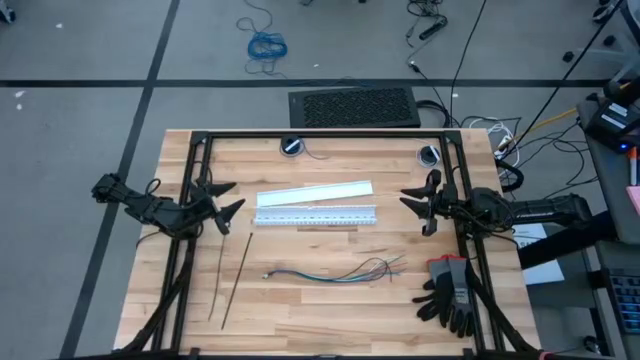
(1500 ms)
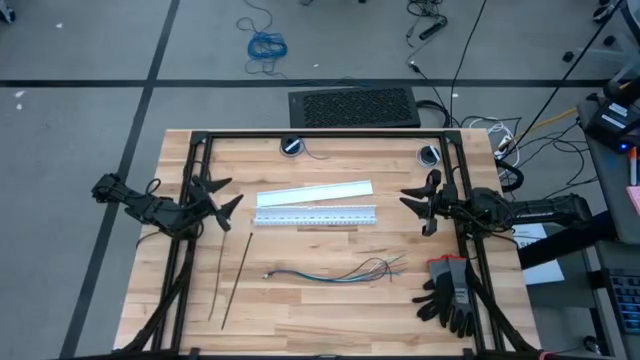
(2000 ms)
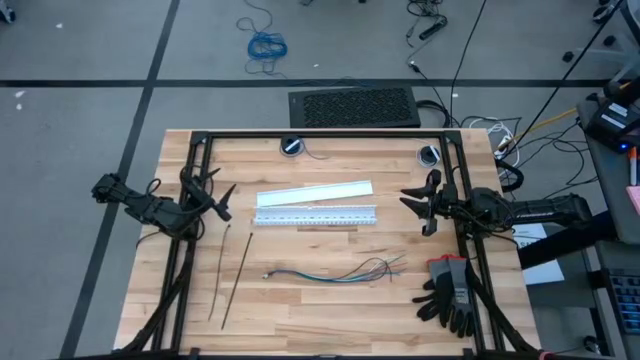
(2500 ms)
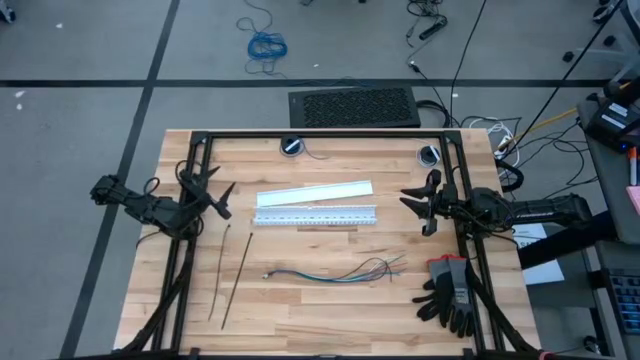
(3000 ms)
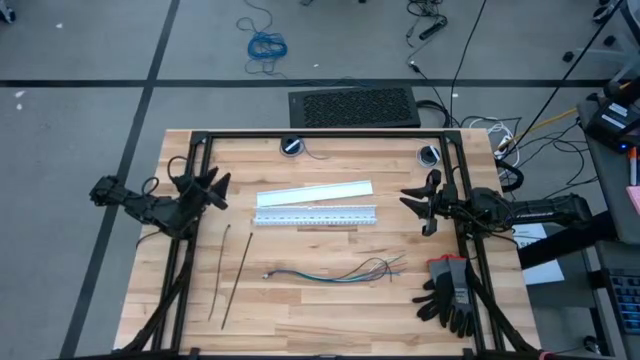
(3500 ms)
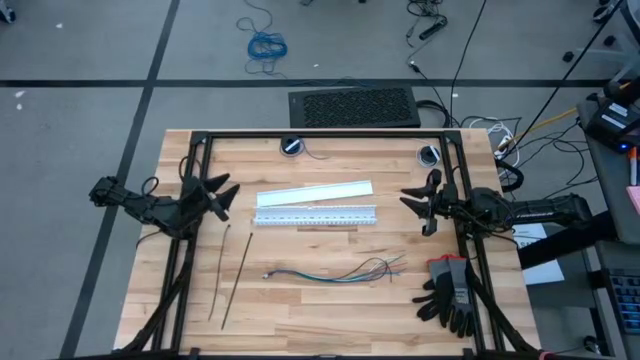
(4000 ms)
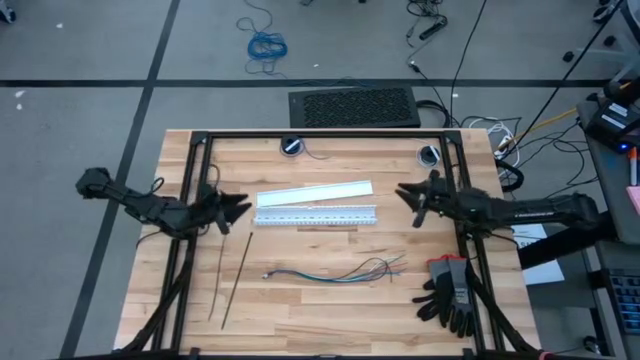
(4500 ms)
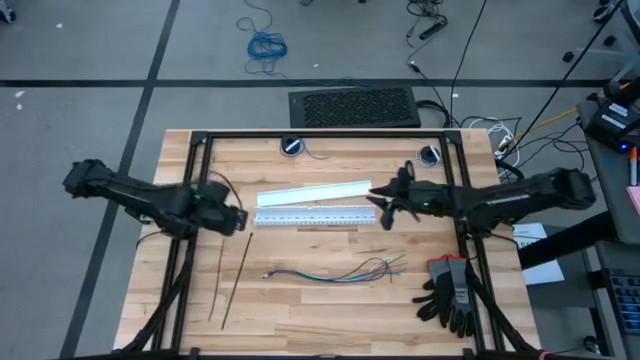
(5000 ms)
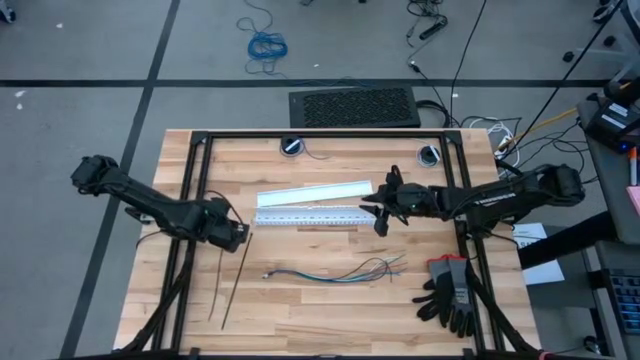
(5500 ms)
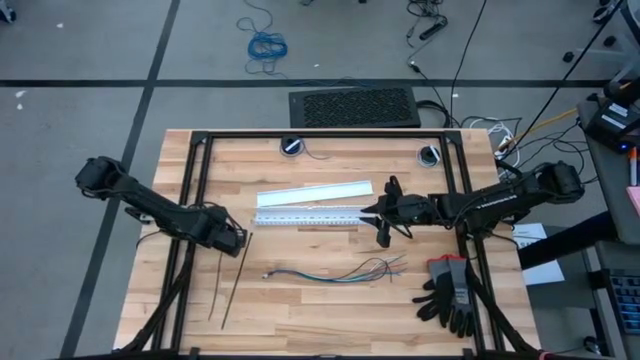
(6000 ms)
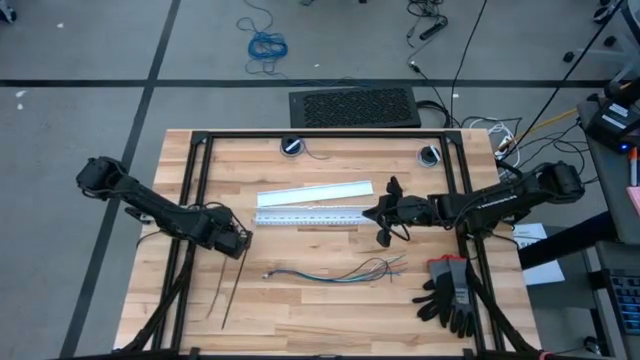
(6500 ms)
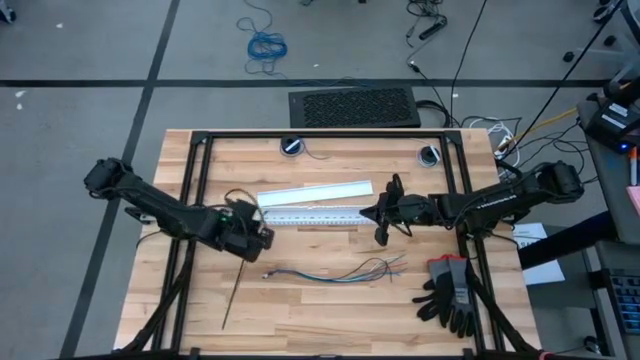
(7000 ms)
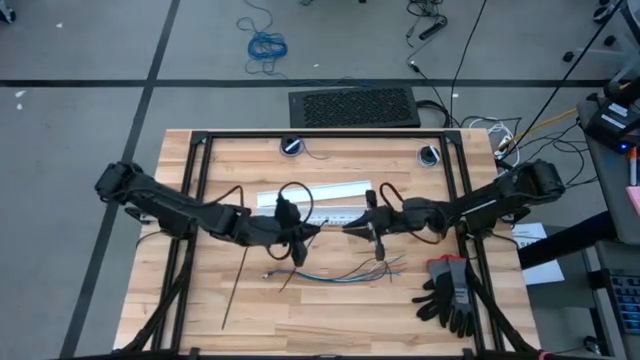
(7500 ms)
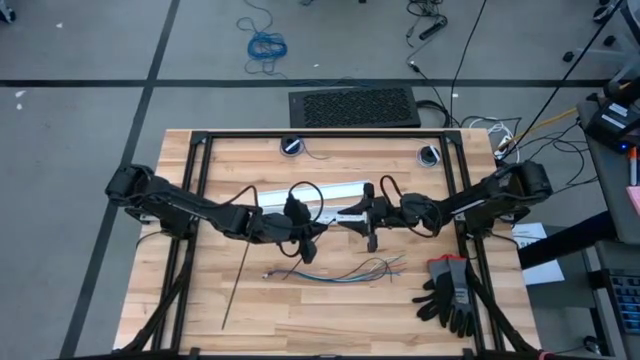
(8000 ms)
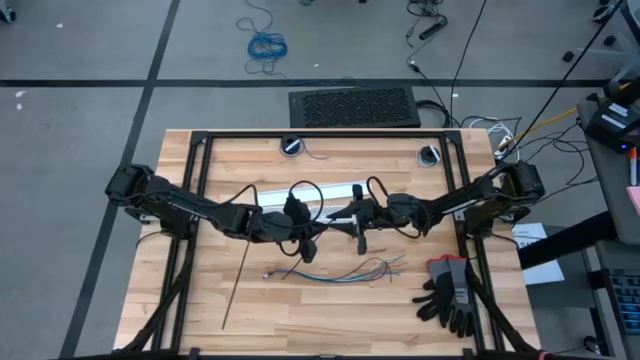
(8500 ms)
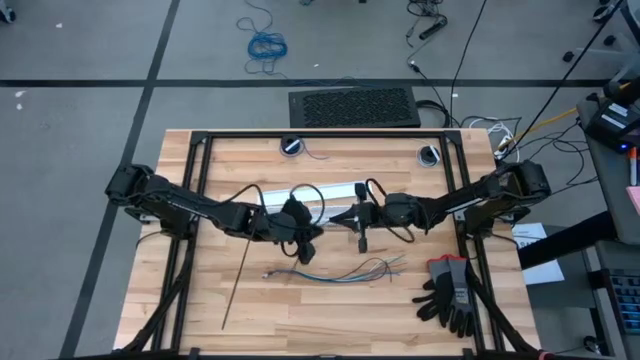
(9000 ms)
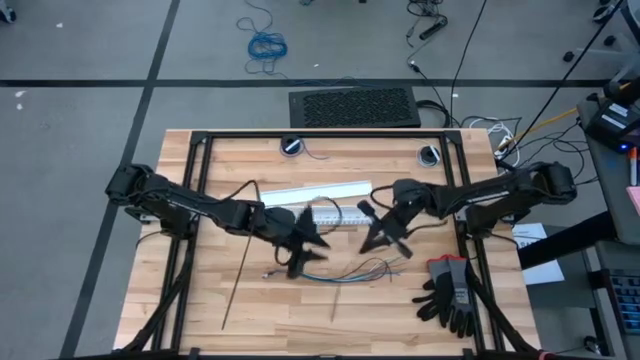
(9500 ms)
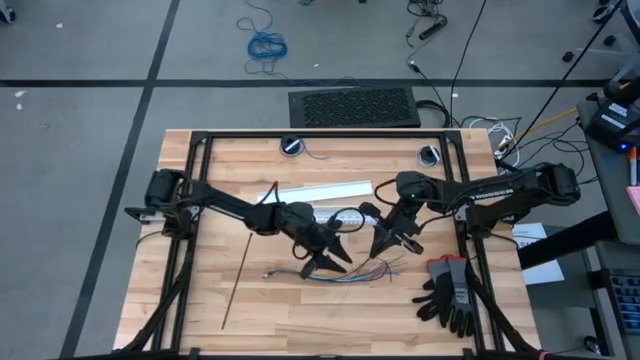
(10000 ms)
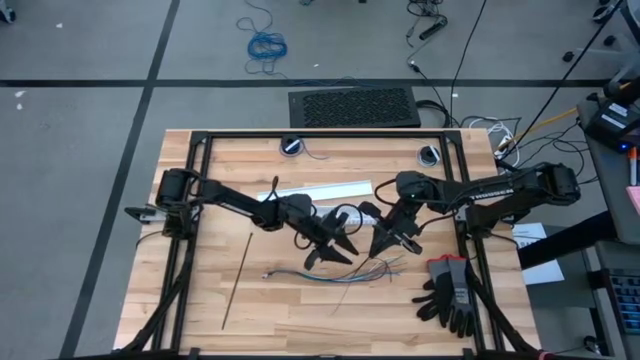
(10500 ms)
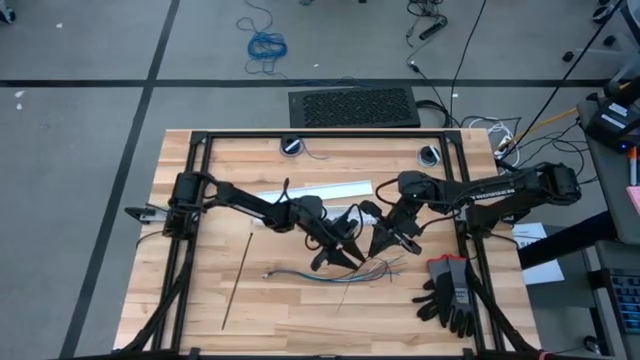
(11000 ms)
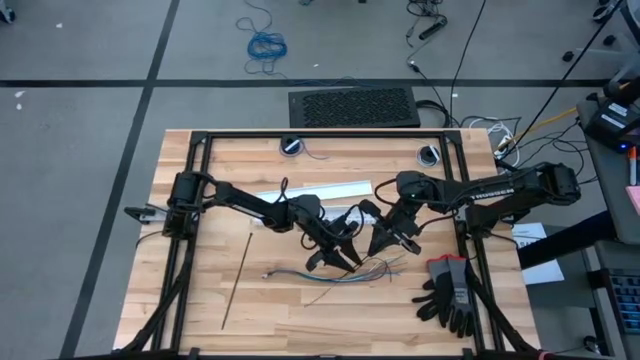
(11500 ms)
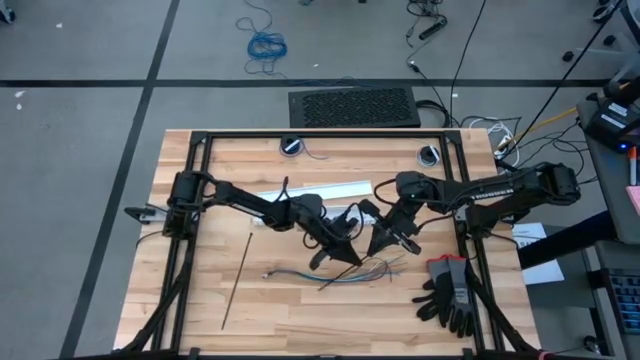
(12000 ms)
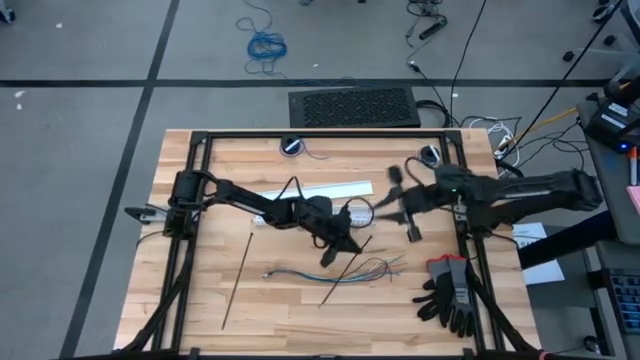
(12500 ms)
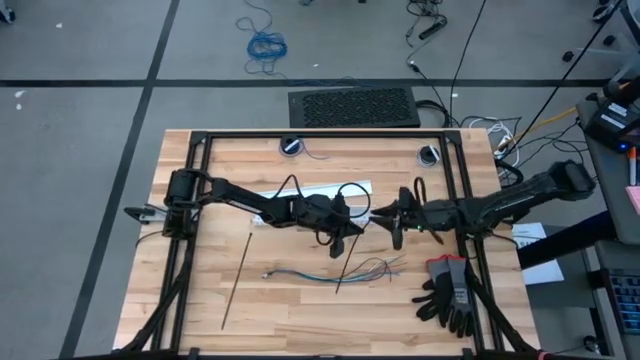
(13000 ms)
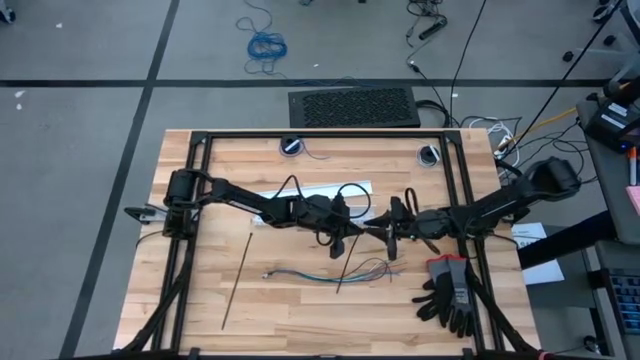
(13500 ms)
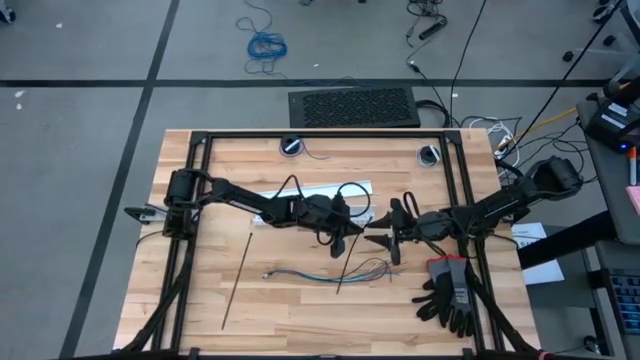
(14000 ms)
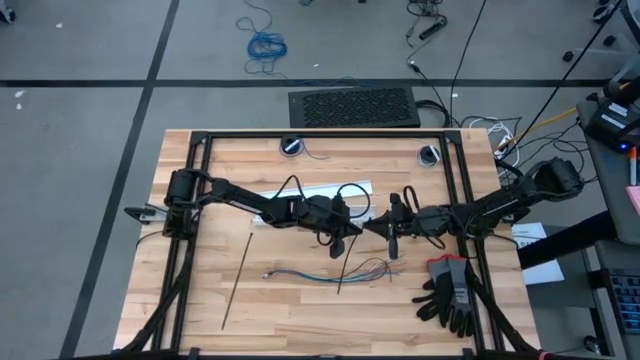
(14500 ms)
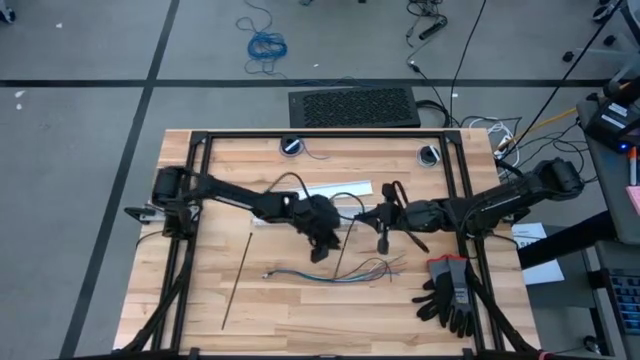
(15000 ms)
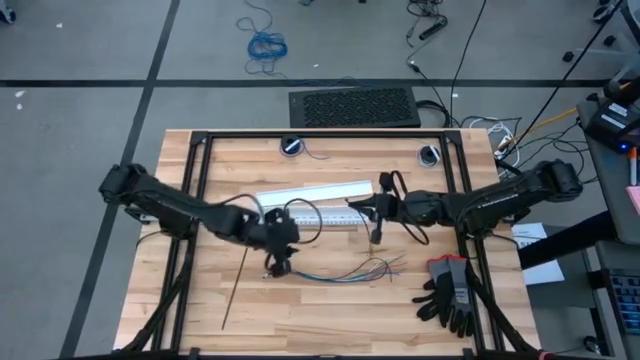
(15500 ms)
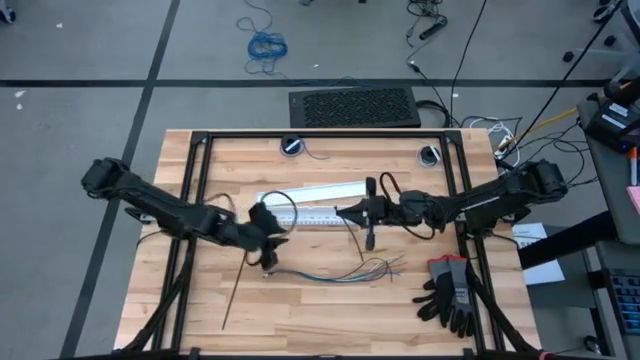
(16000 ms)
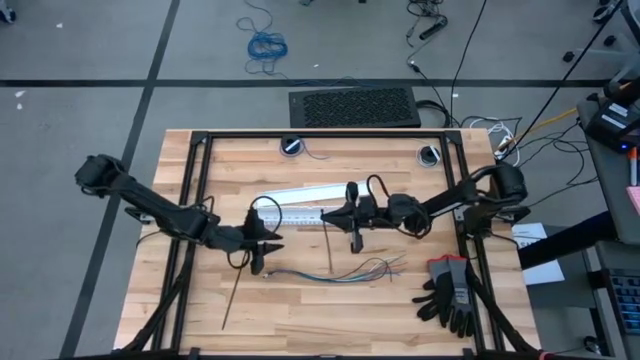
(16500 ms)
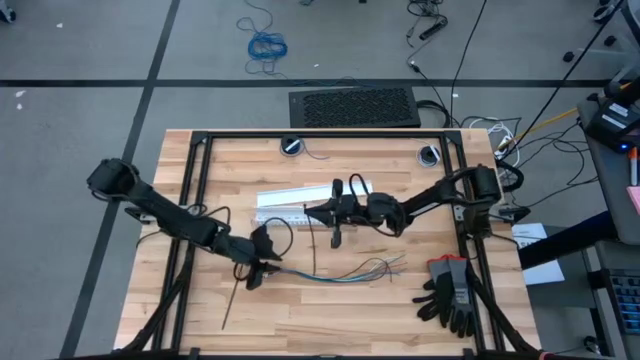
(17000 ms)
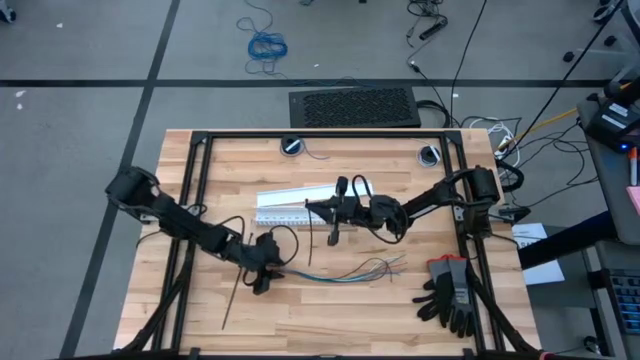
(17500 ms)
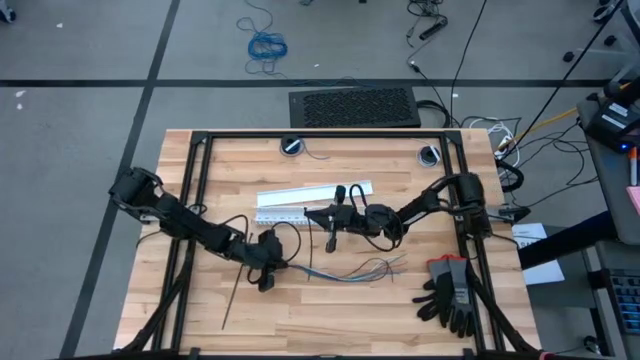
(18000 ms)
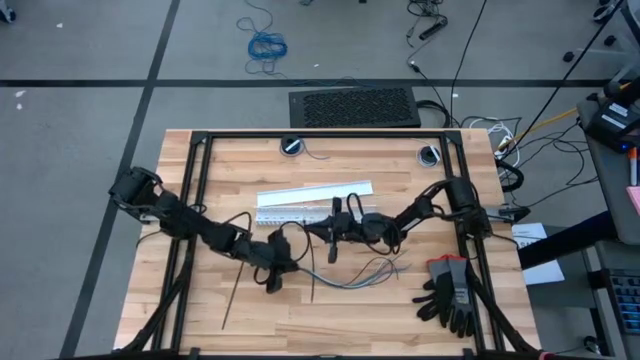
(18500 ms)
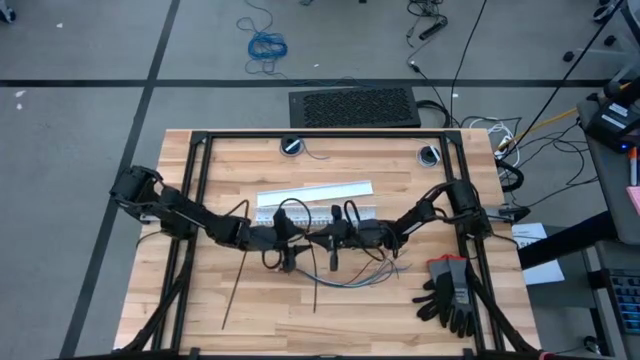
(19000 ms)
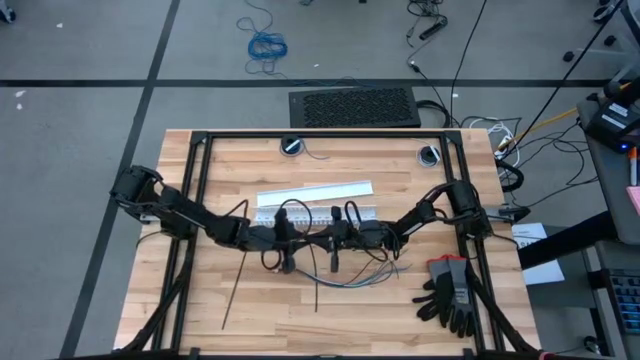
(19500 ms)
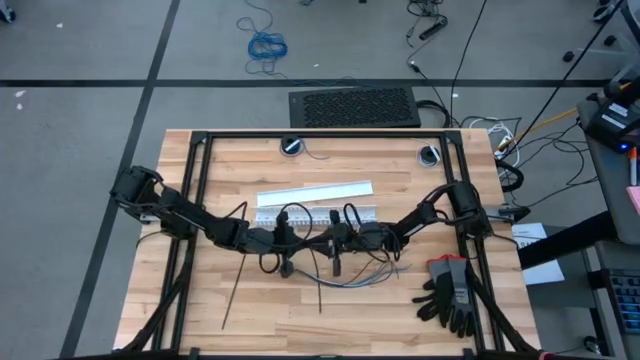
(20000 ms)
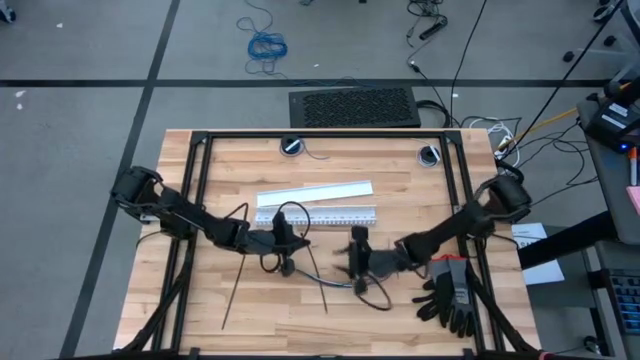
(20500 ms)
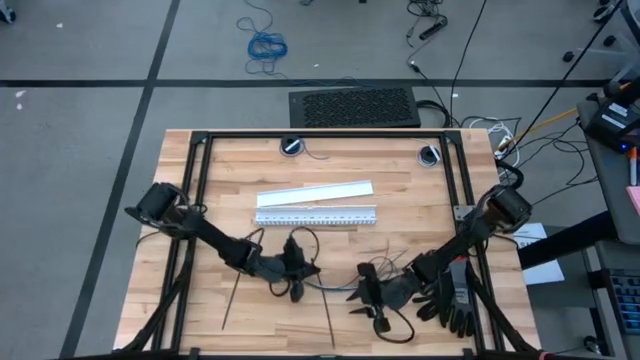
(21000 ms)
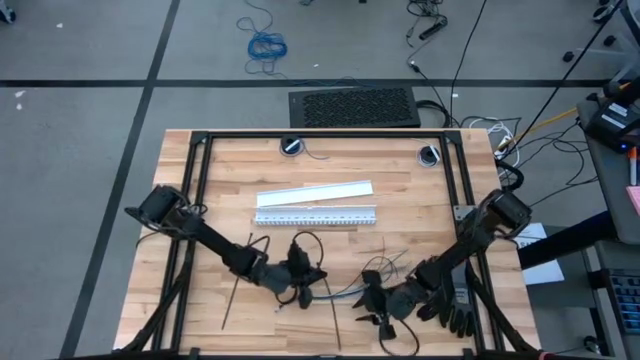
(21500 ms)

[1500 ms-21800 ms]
Task: Ziptie cables
Wrap the left black zip tie around the colored cable wires
